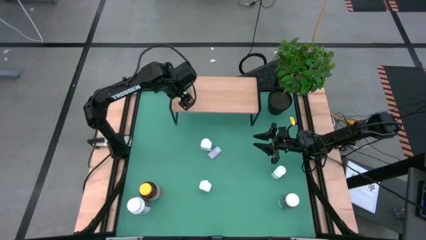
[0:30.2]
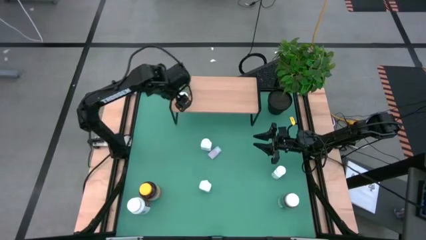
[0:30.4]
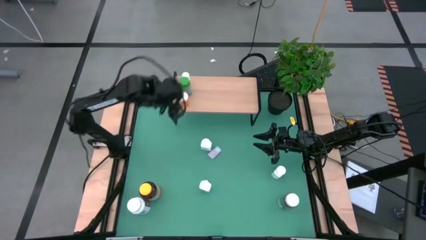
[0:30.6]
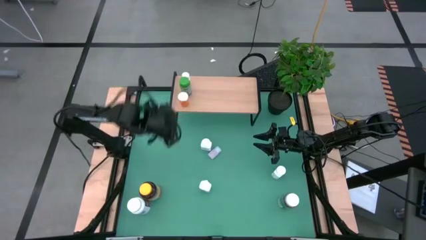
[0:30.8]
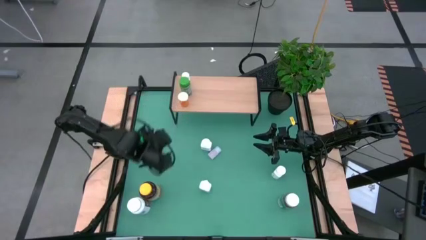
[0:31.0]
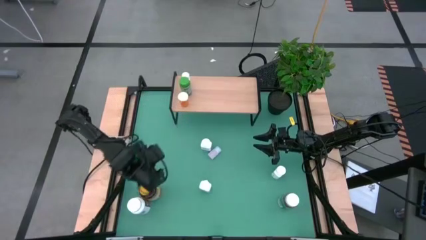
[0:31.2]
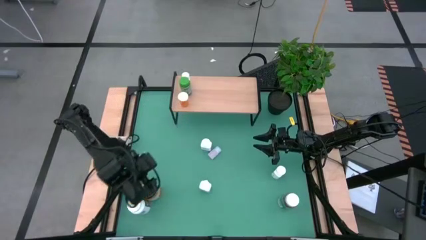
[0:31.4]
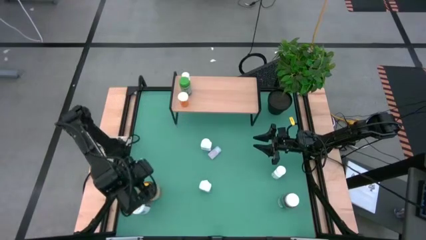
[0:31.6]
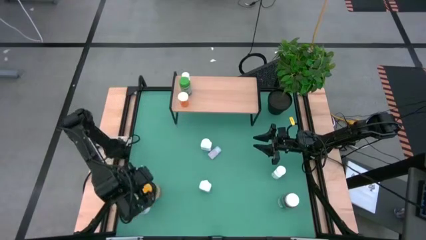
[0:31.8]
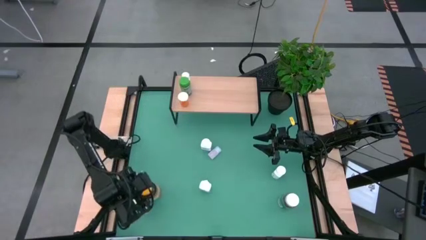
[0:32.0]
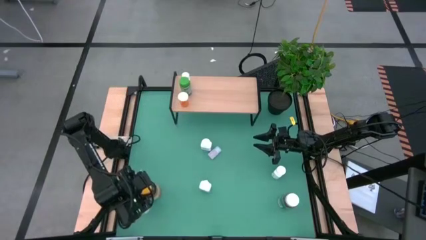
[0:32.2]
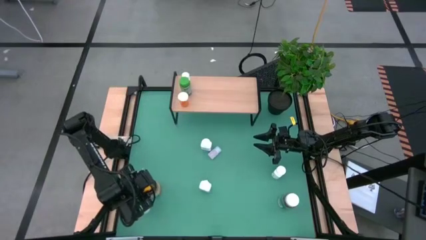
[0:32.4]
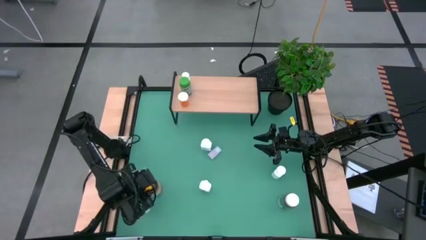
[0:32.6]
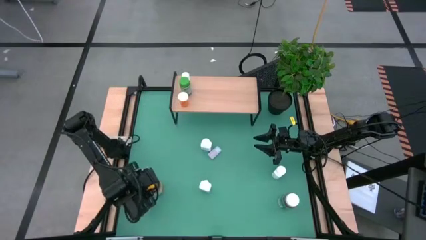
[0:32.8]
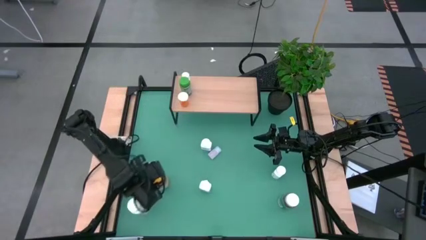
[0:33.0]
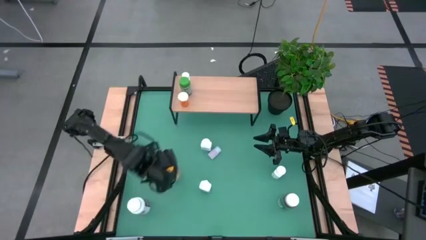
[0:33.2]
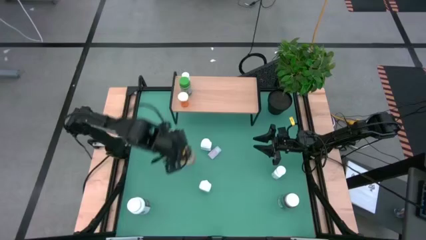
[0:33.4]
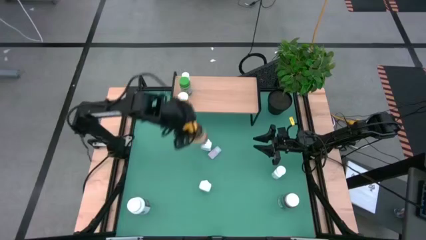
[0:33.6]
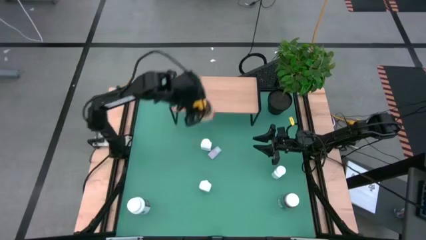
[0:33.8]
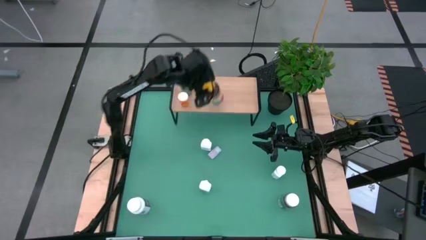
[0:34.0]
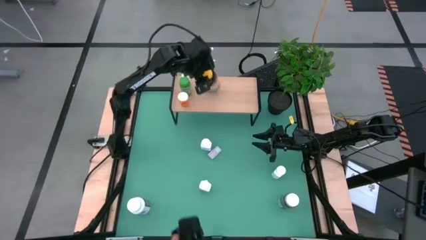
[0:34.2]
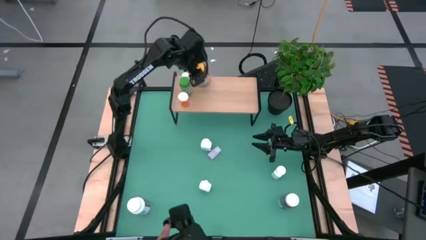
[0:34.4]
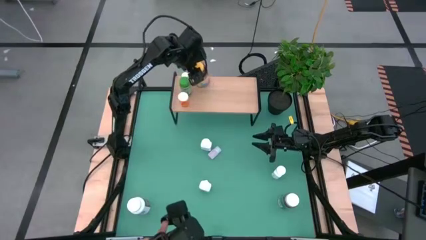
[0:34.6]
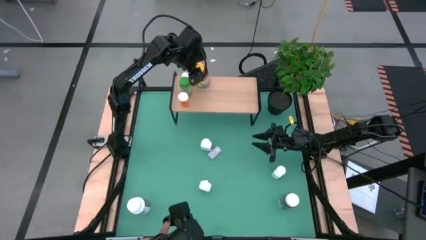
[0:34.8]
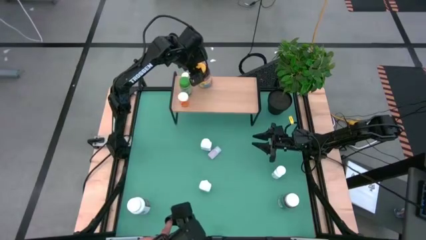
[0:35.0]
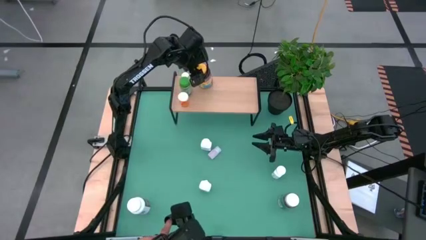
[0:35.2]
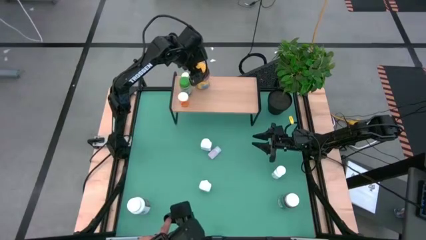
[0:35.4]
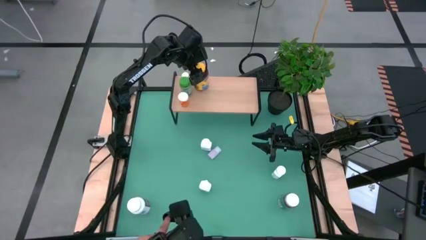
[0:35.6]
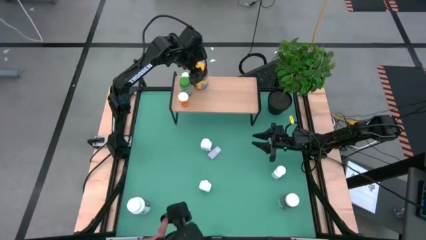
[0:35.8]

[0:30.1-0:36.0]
Task: Pick and place medicine bottles onto shelf by color
Put the yellow bottle on the shelf

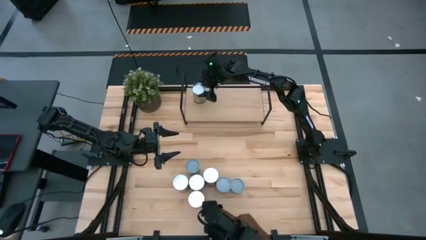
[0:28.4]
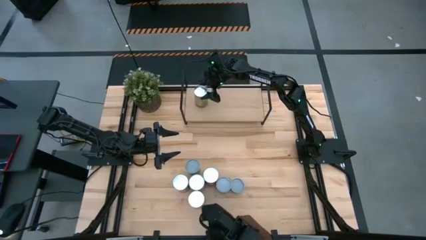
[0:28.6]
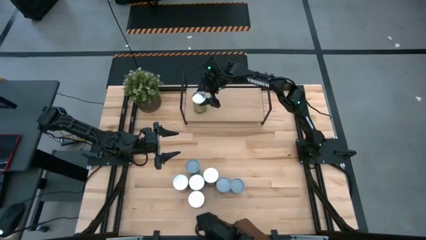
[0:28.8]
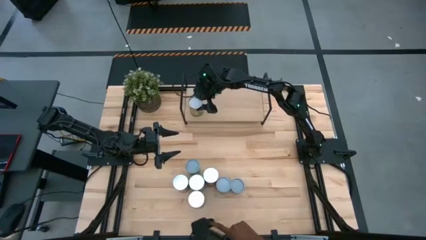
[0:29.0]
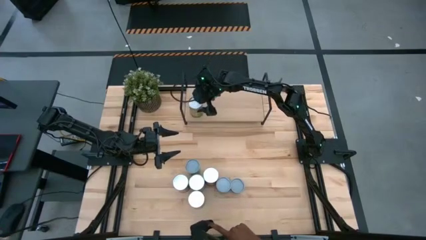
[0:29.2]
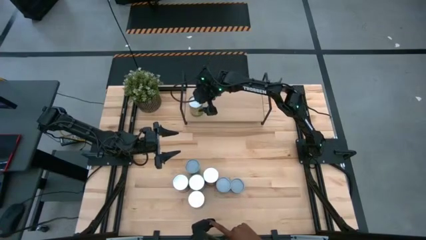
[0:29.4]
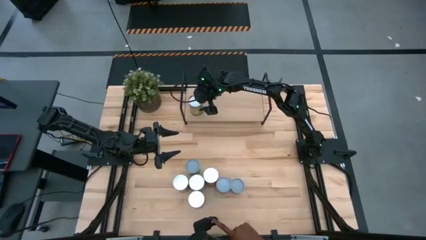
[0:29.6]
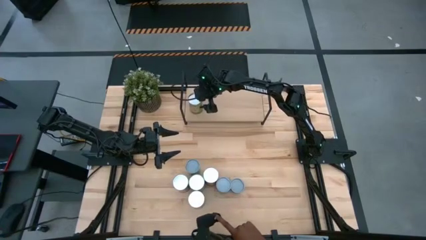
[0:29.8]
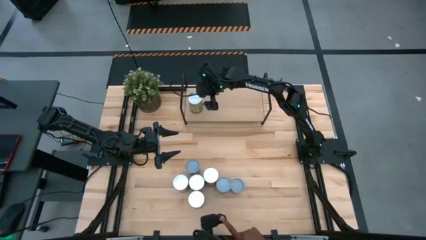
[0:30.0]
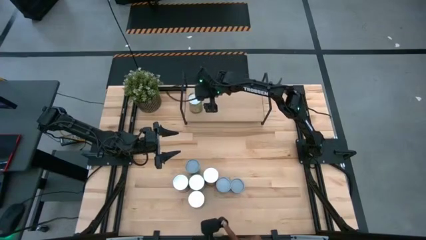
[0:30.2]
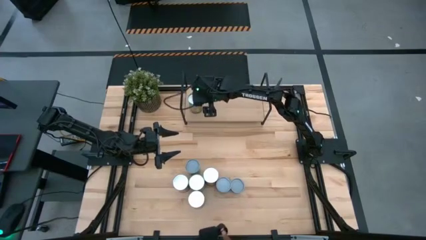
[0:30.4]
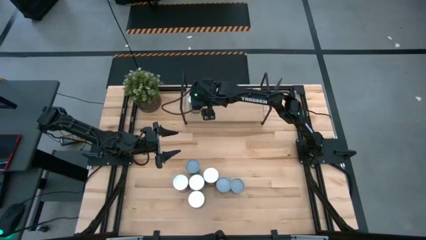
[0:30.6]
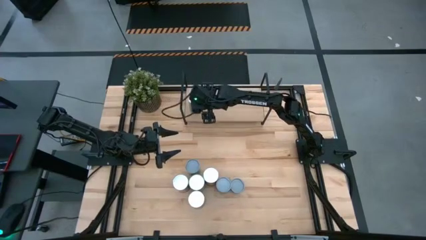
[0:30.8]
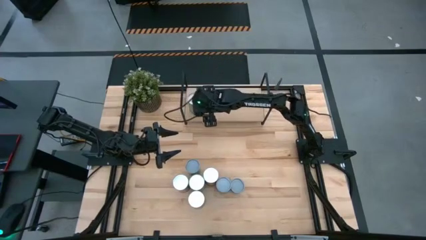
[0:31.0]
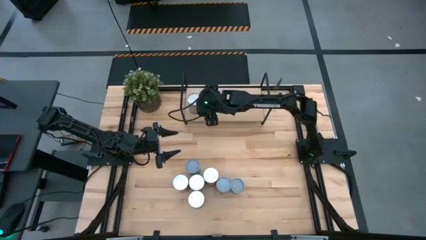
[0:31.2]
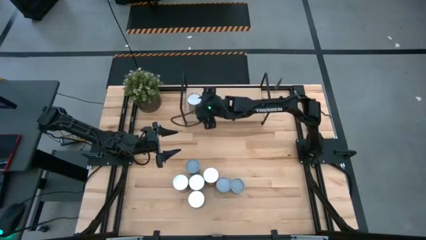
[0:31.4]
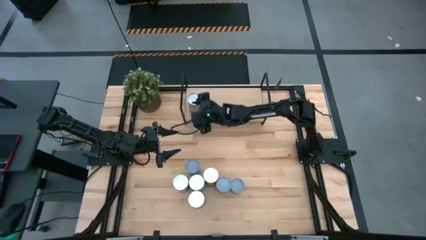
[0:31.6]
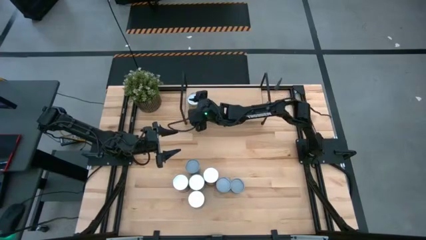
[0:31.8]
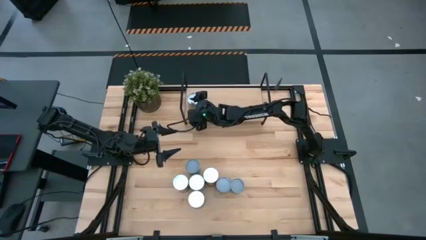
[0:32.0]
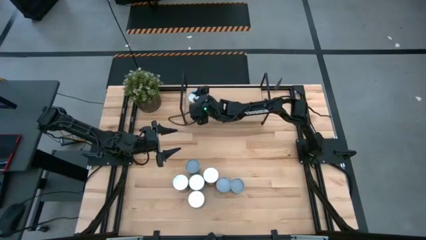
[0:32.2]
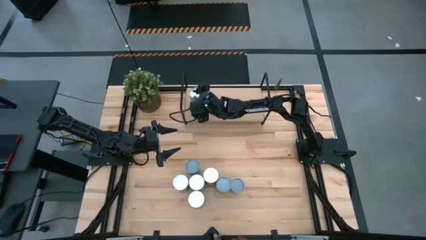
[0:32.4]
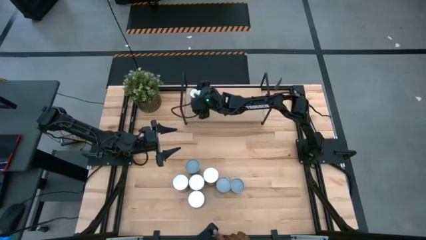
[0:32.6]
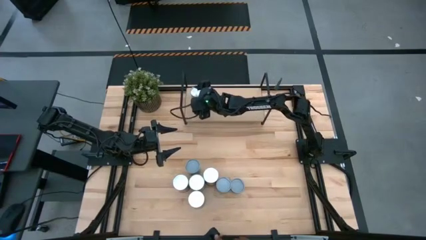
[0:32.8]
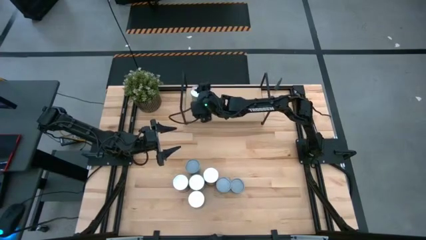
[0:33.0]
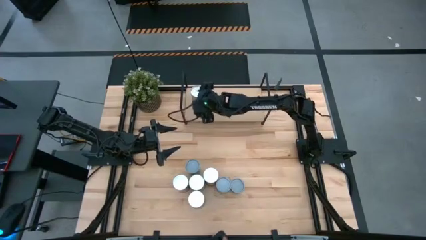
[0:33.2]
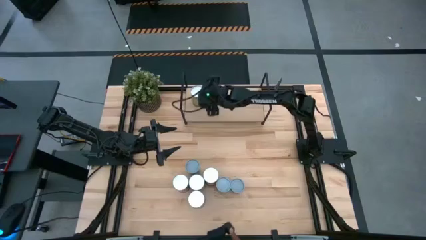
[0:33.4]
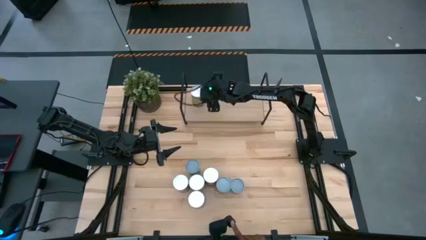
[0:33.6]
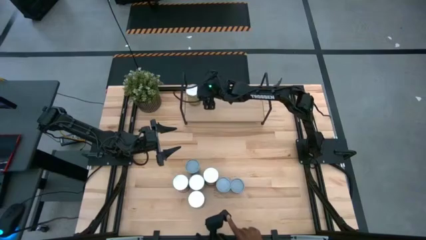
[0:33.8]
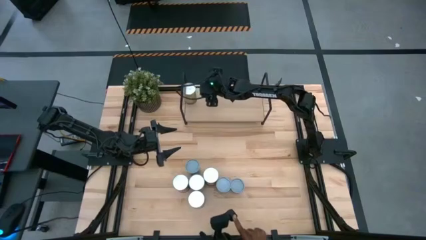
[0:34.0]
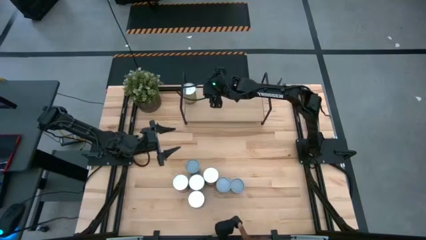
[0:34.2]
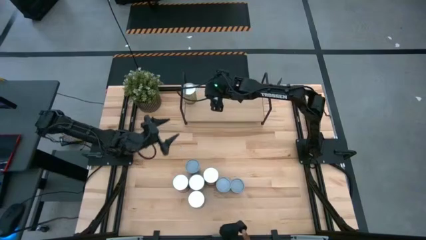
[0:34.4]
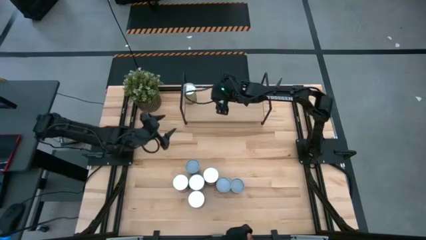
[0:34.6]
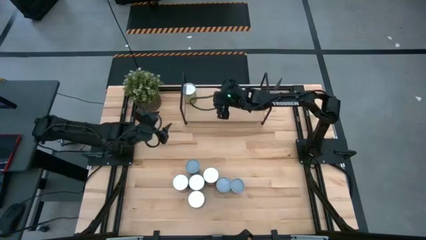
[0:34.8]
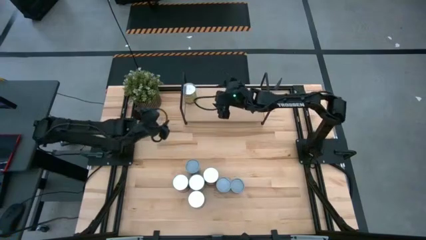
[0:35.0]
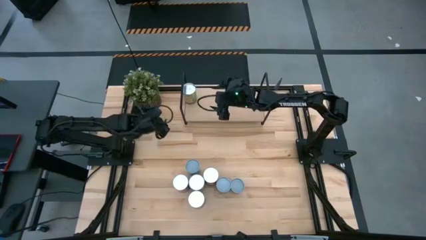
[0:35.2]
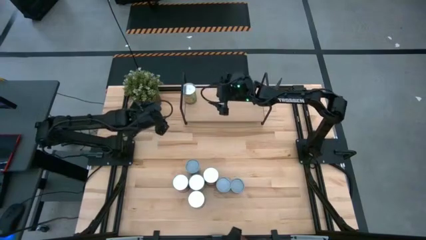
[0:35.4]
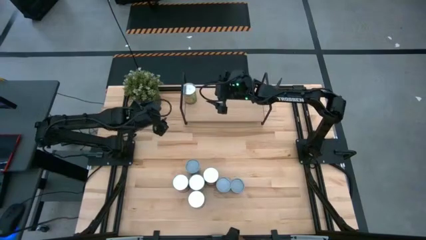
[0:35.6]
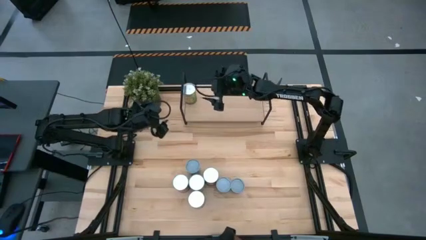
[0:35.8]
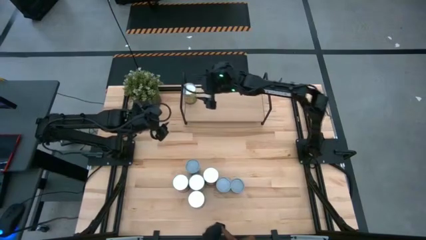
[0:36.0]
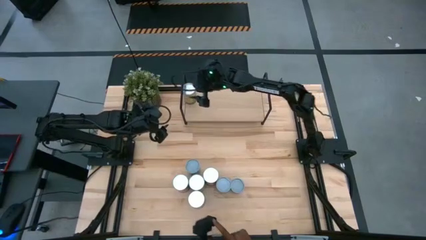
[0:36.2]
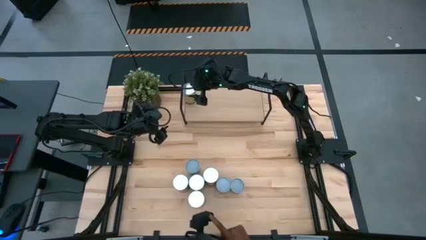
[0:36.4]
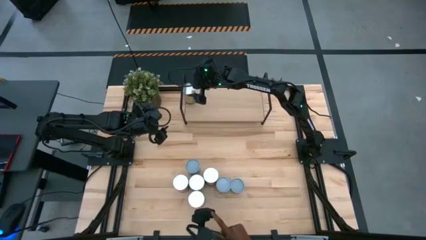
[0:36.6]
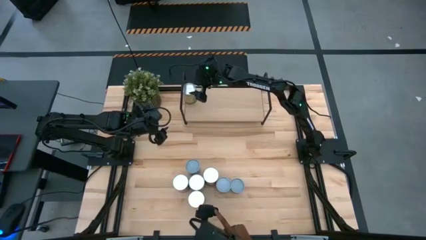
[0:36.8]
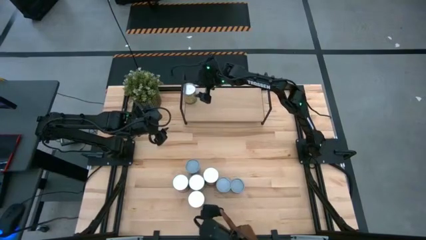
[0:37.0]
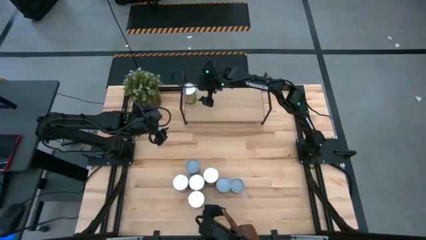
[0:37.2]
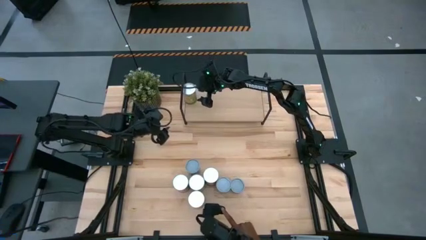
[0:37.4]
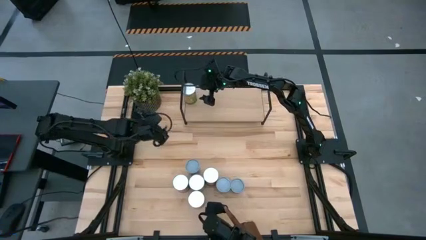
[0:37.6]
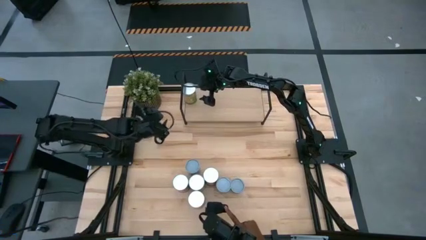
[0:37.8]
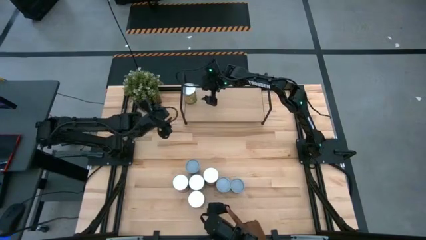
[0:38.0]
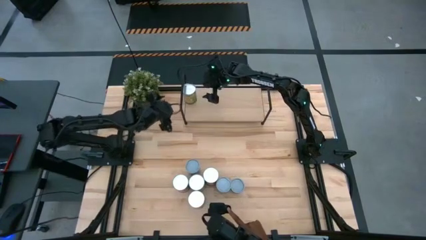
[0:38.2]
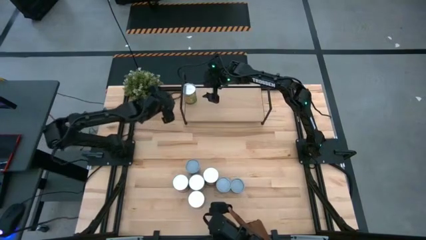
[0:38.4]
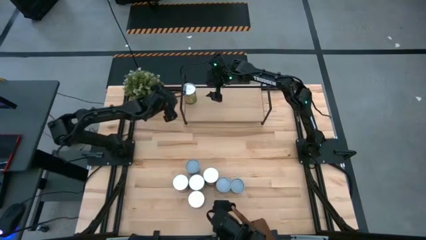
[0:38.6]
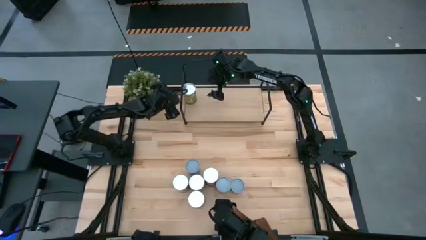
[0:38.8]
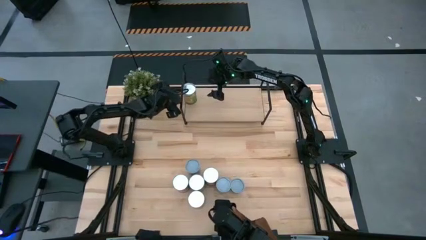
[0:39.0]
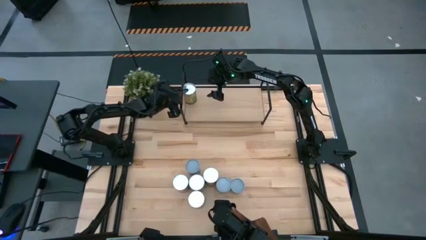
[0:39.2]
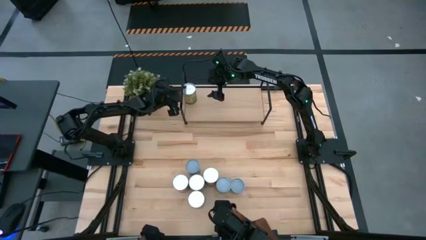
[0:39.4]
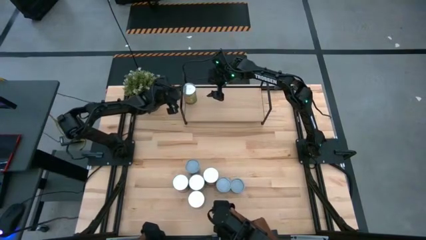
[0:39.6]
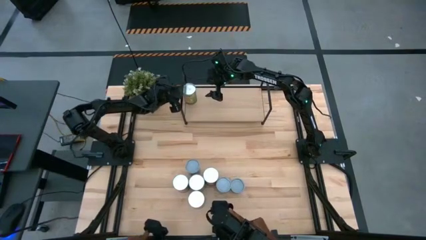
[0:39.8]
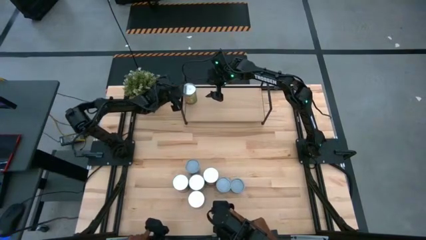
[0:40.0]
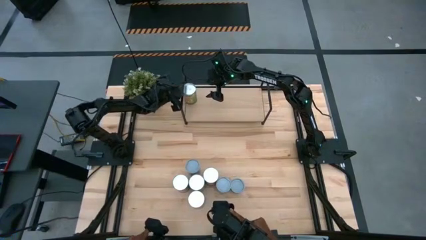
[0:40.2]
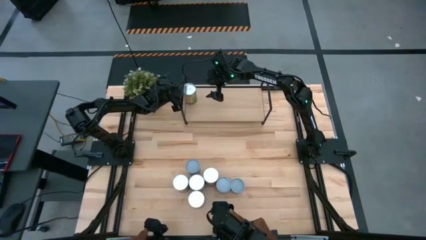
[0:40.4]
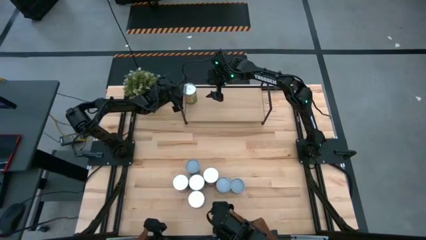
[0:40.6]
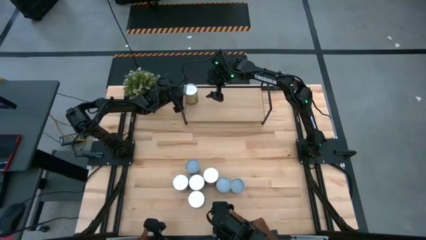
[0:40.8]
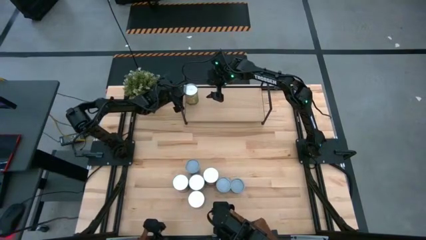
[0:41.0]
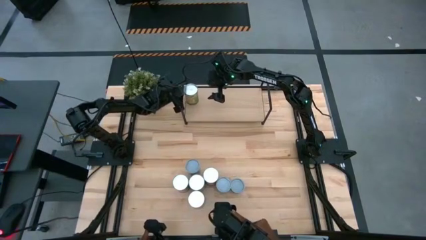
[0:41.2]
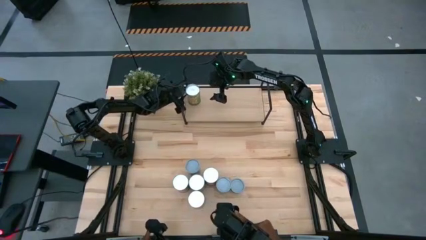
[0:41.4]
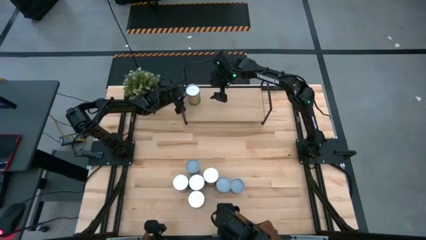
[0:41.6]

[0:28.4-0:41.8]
Task: Pick and place cans onto a shelf
Put the canned oranges on the shelf
